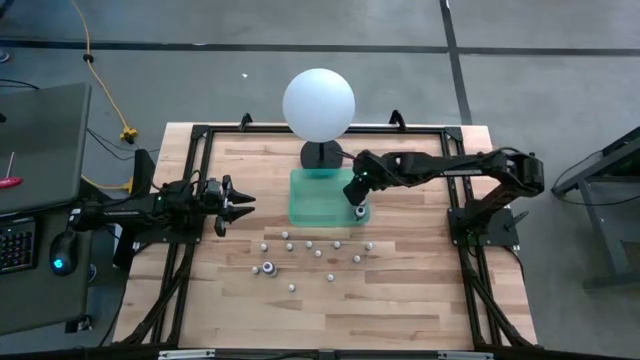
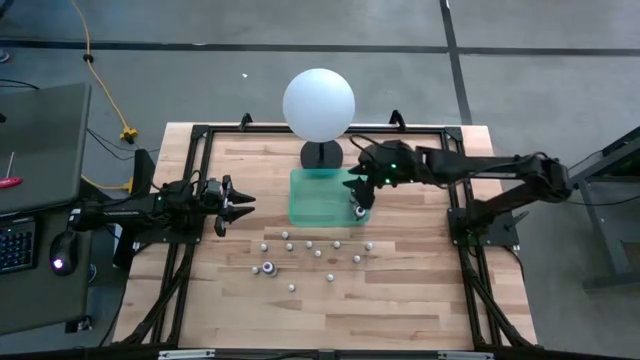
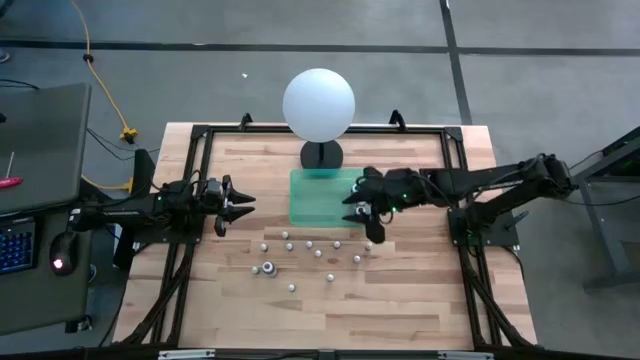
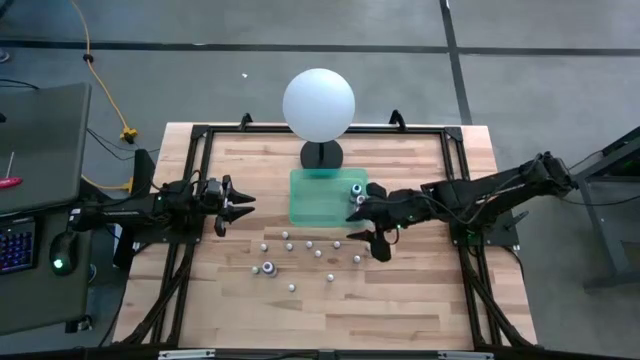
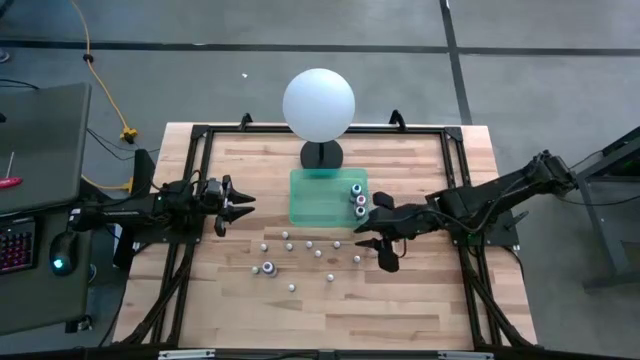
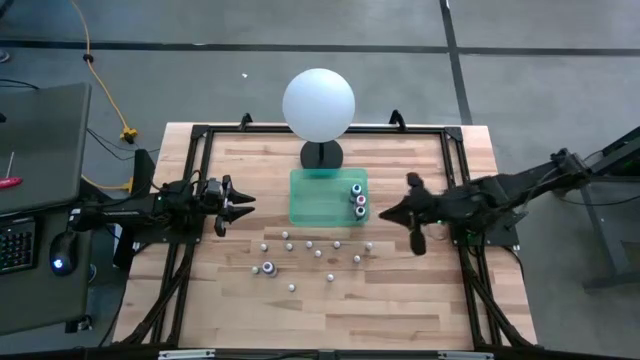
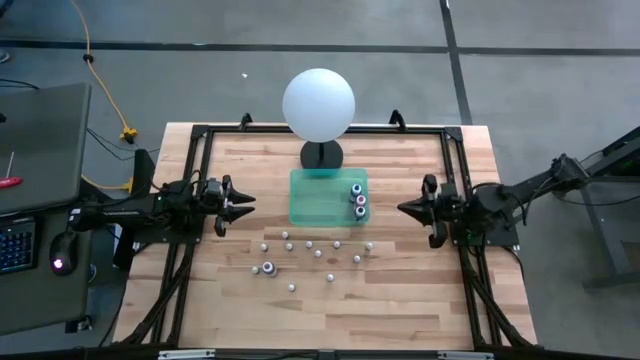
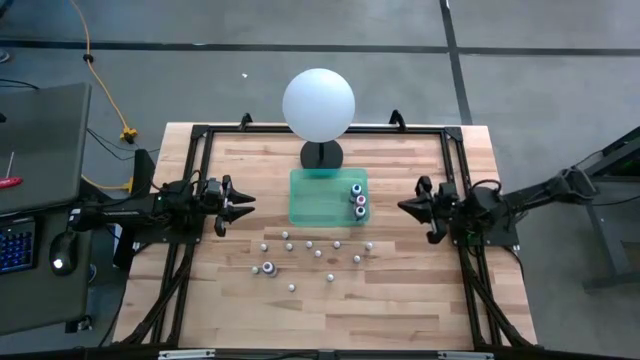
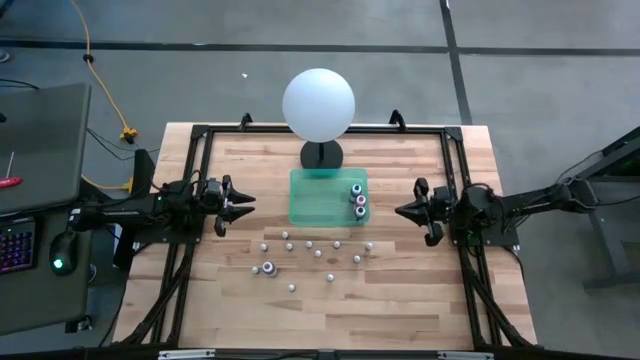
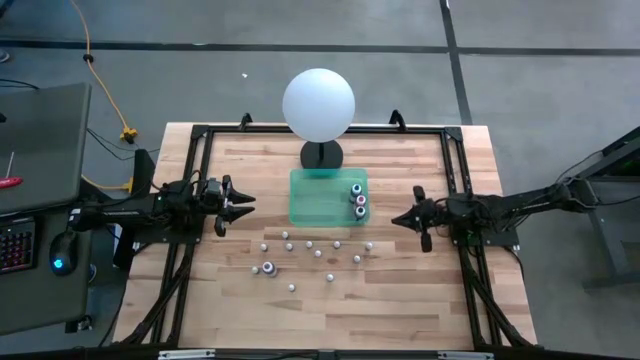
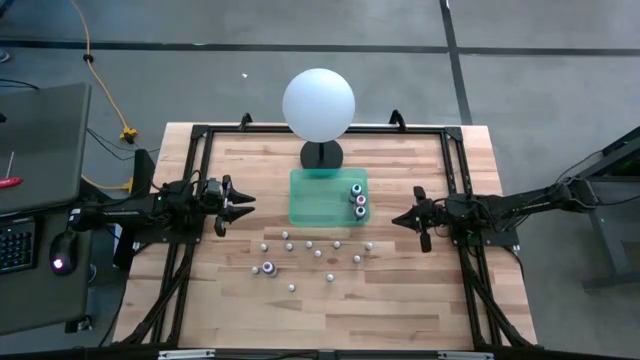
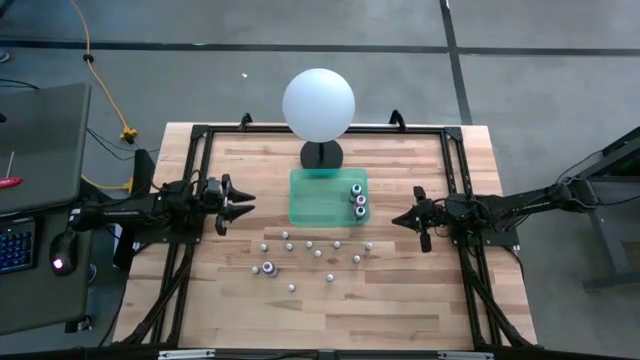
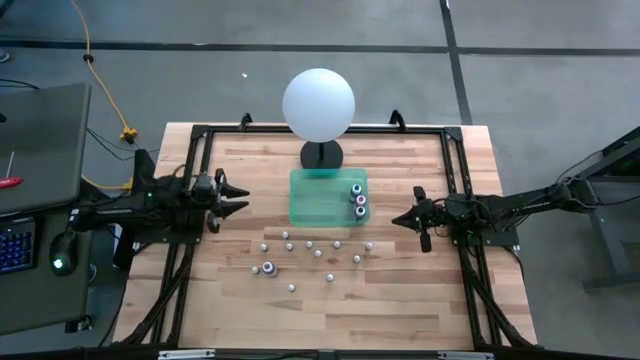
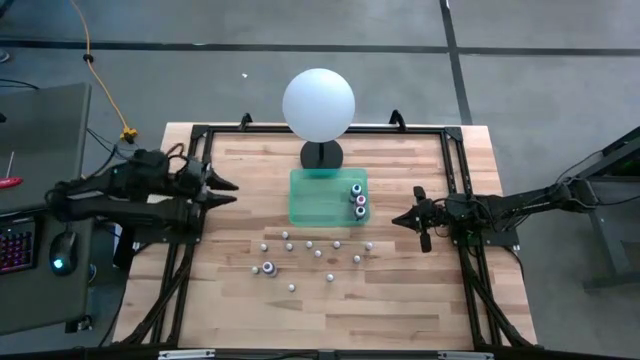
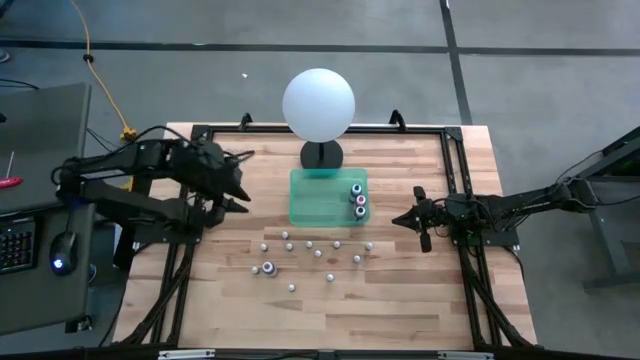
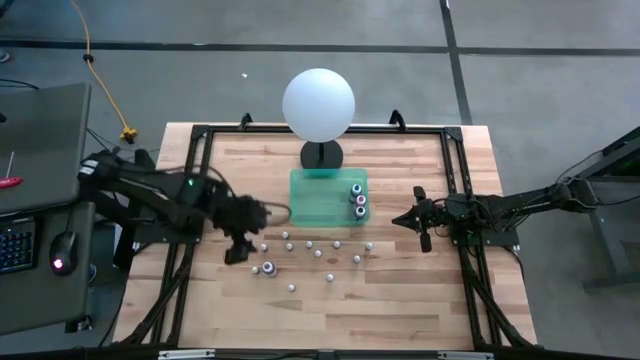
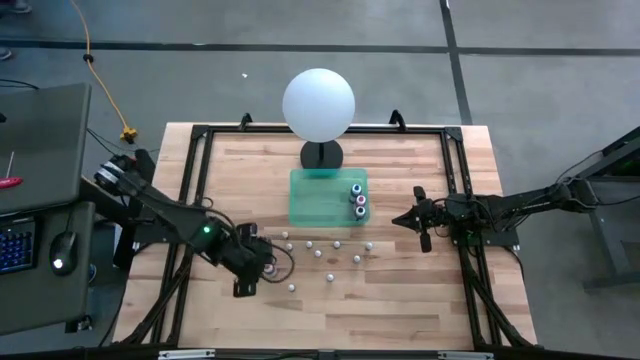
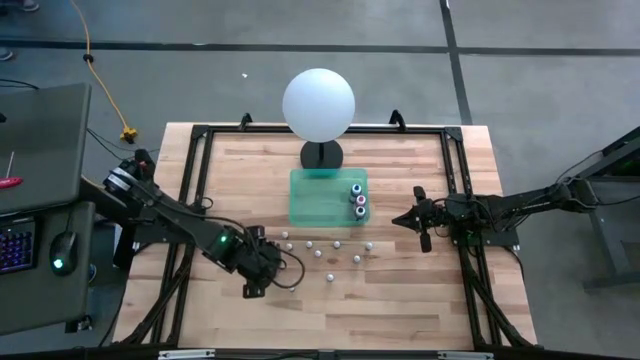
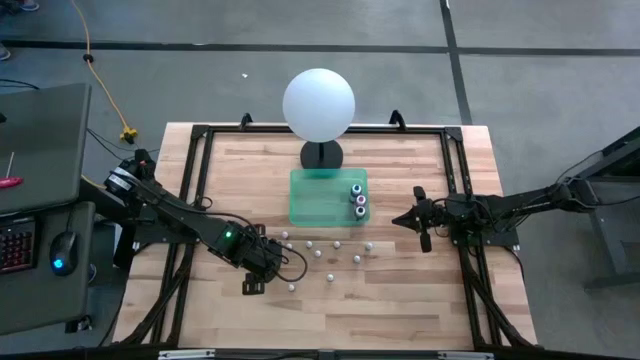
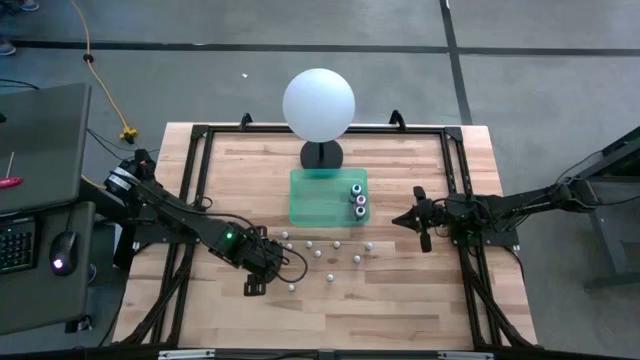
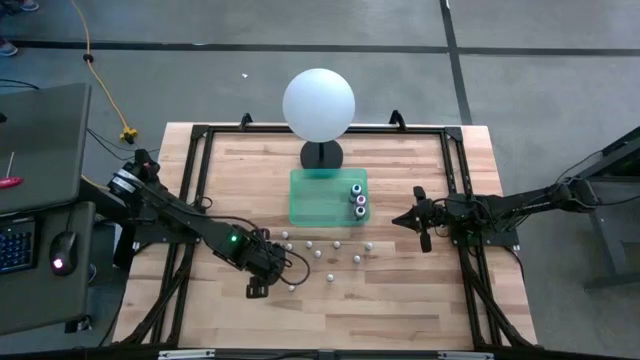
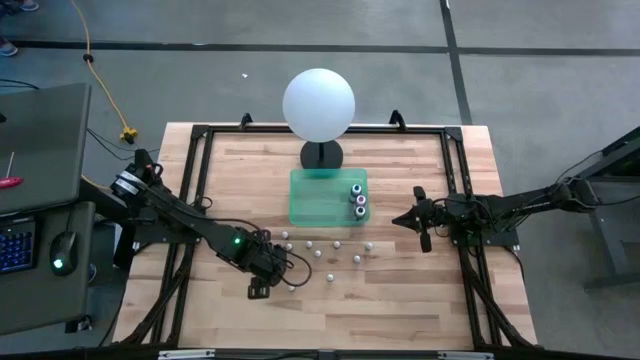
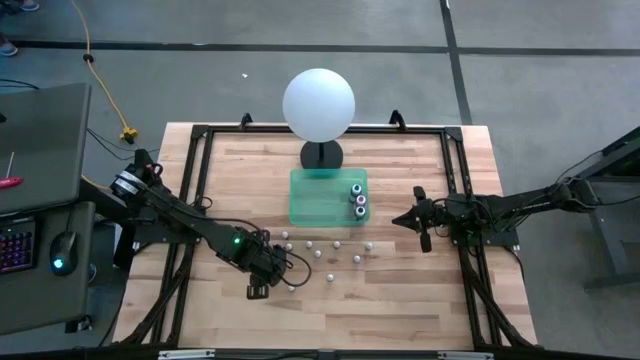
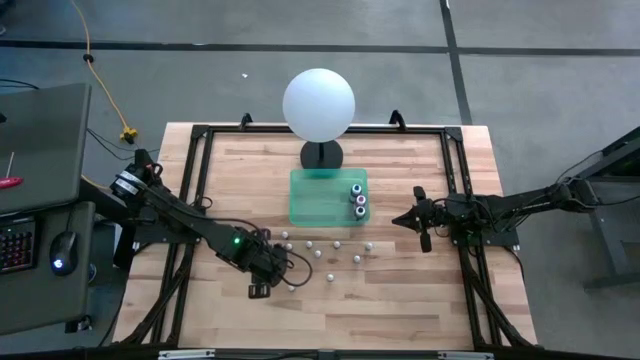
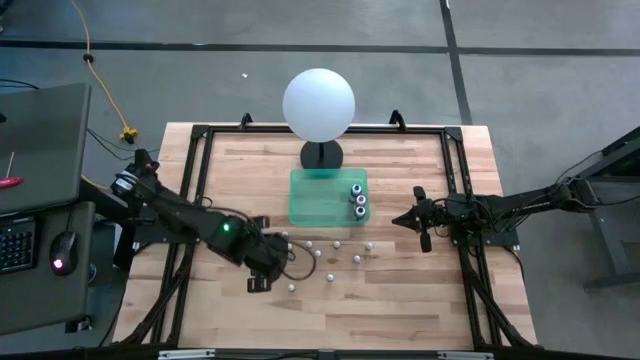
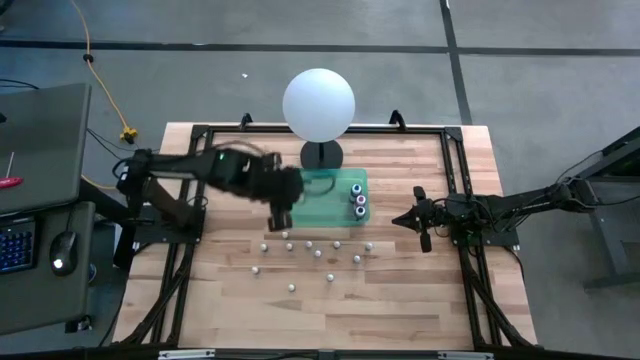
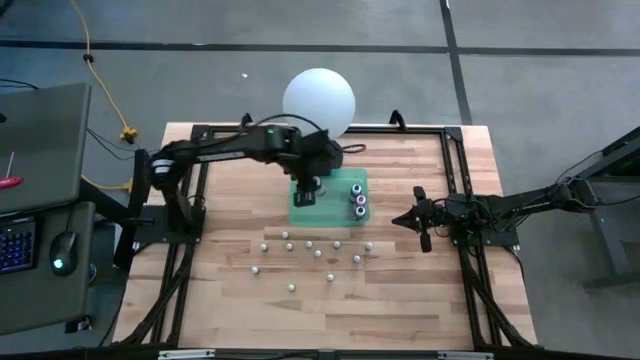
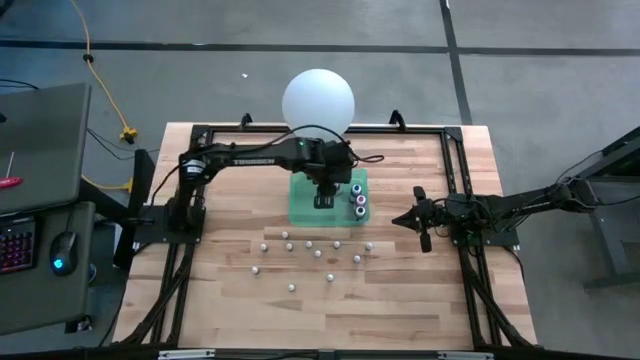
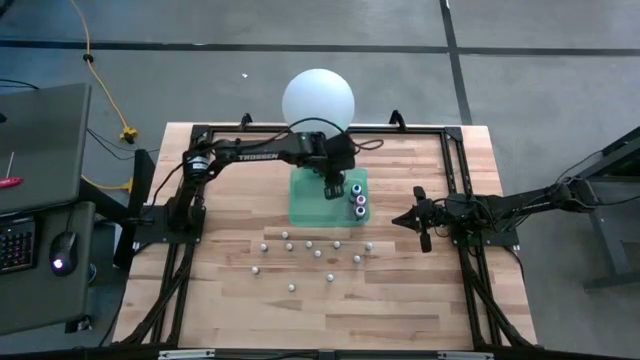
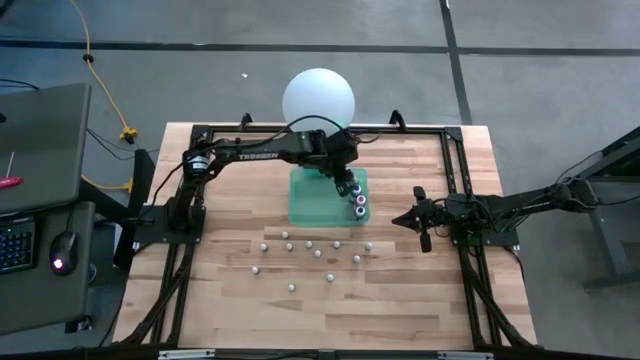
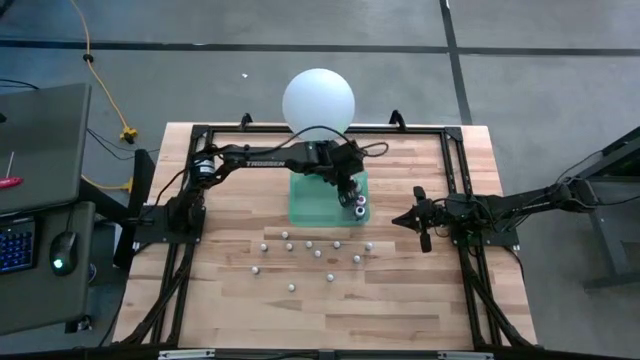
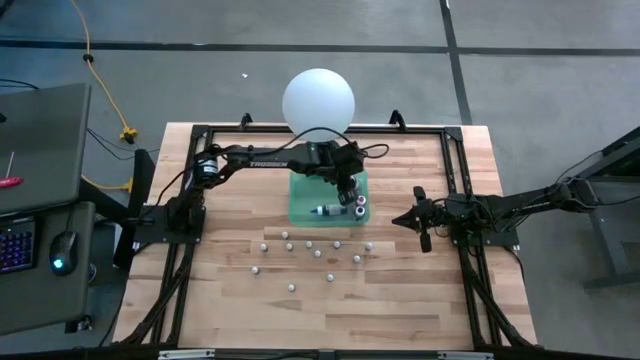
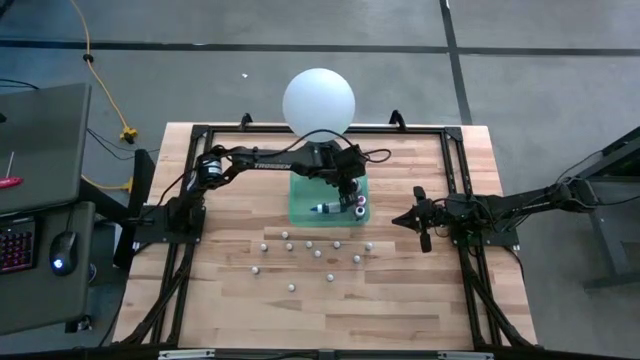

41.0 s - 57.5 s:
Task: Pick & Place food coloring
Put the large purple food coloring bottle into the bin

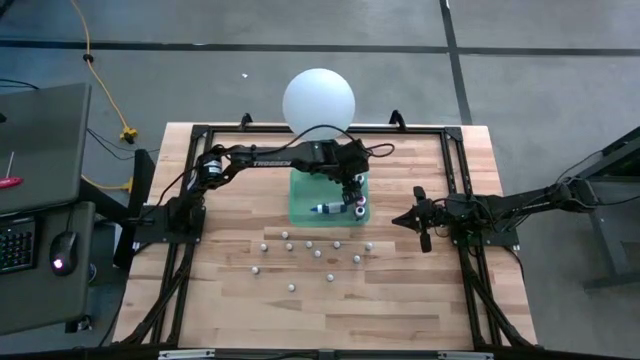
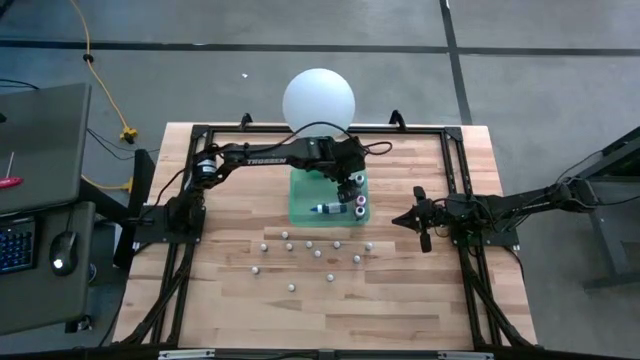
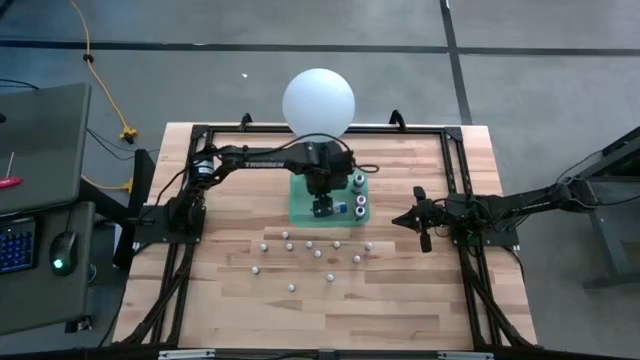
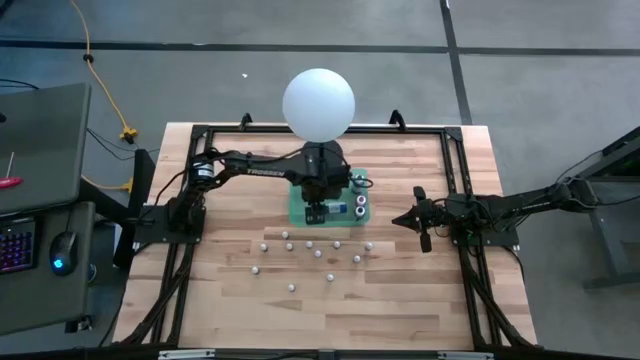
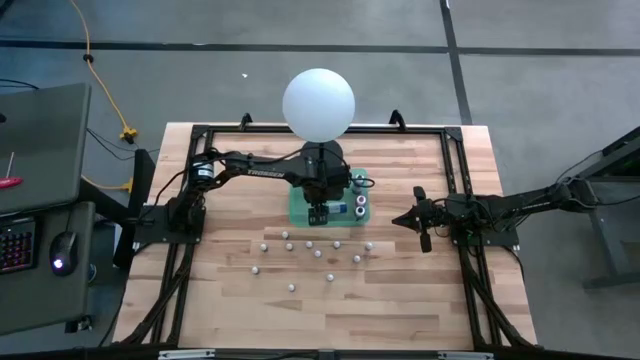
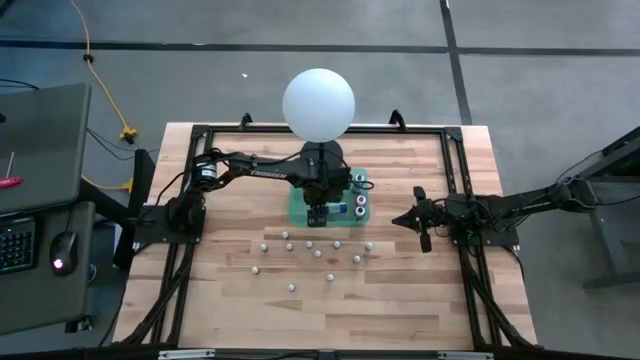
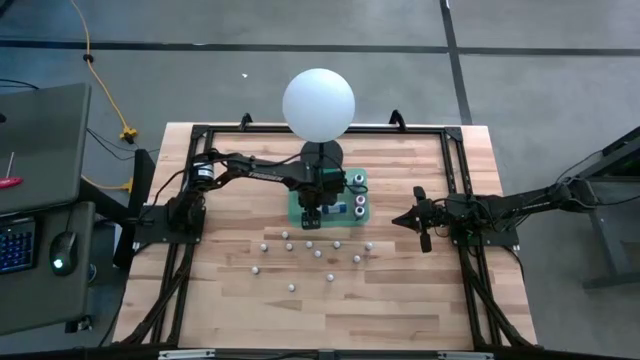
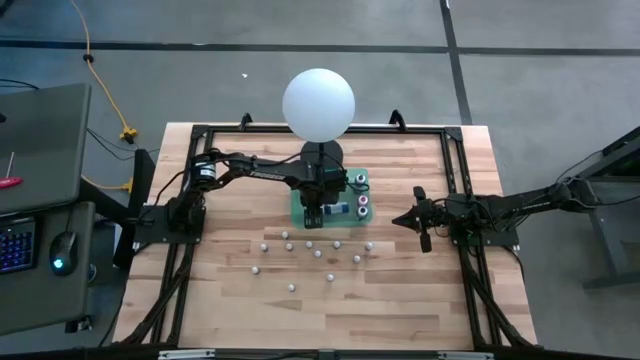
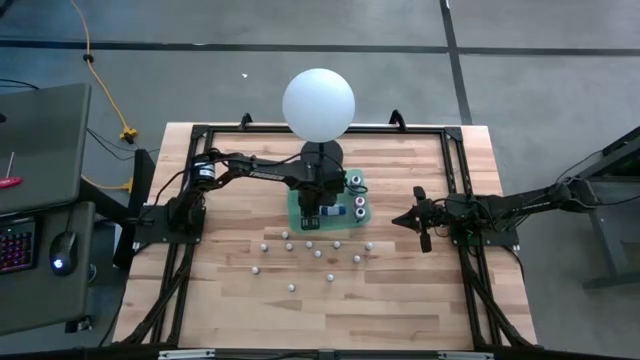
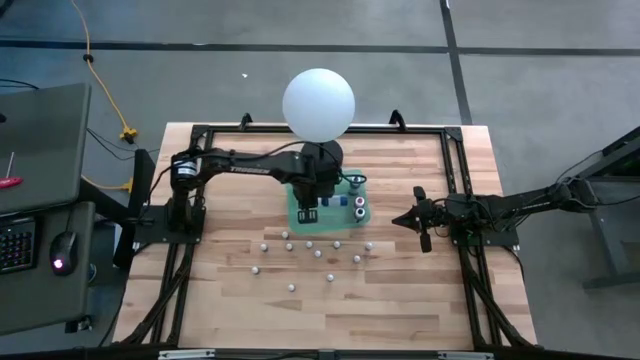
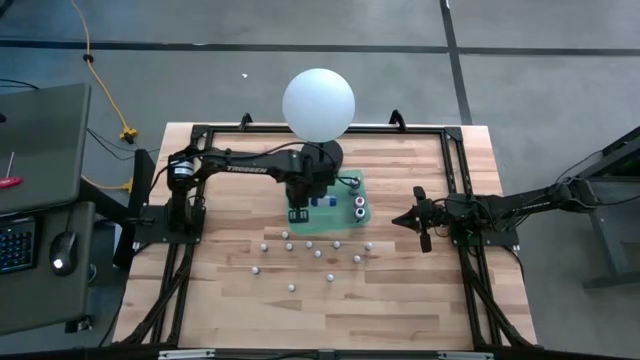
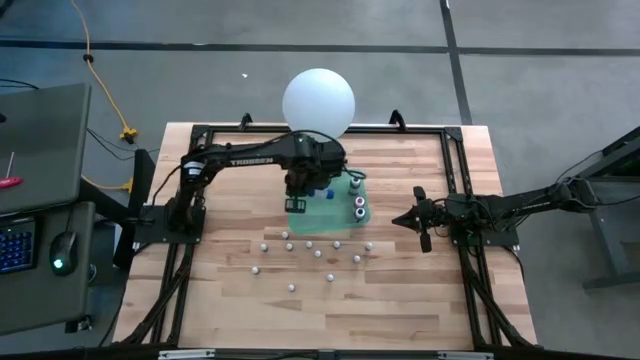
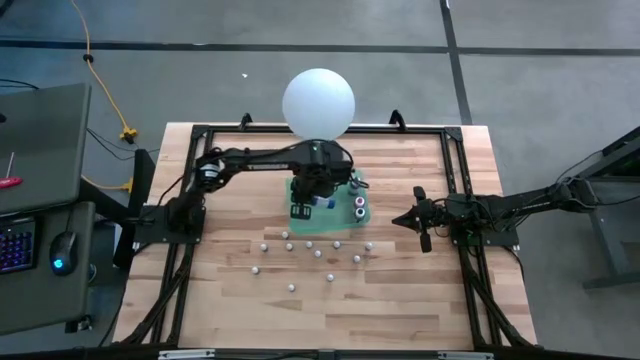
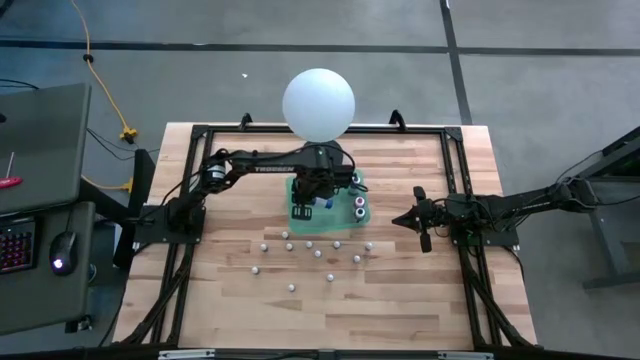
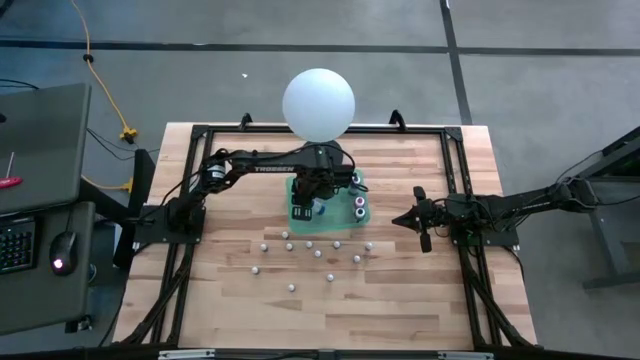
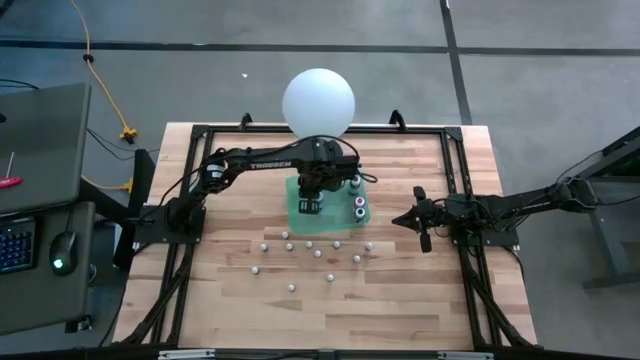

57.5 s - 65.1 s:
Adjust the large blue food coloring bottle in the bin
